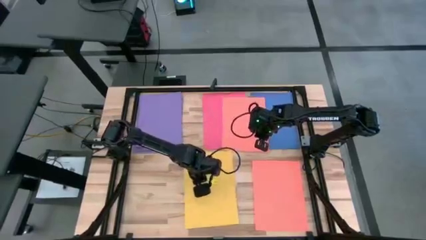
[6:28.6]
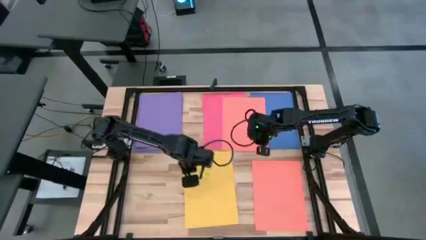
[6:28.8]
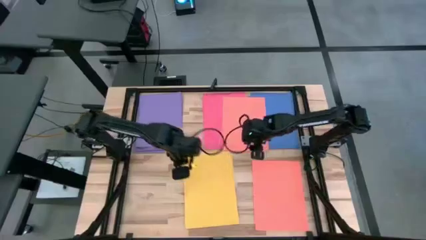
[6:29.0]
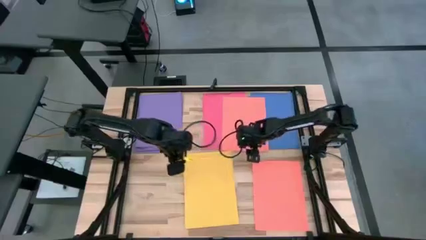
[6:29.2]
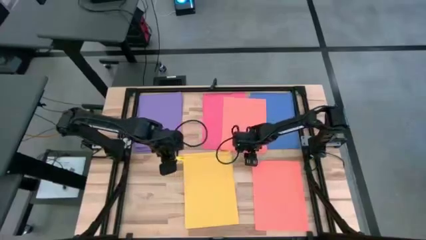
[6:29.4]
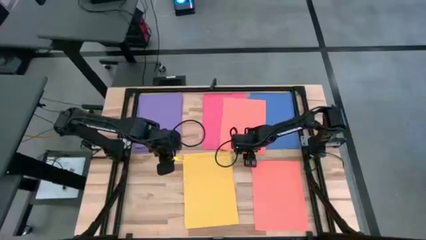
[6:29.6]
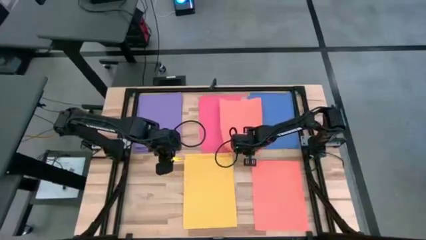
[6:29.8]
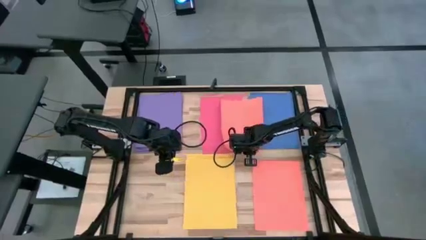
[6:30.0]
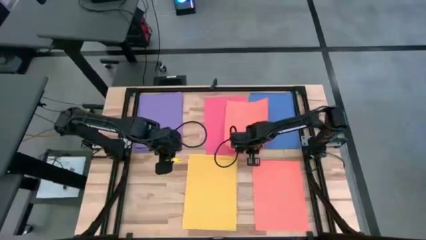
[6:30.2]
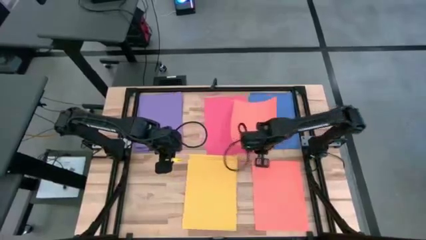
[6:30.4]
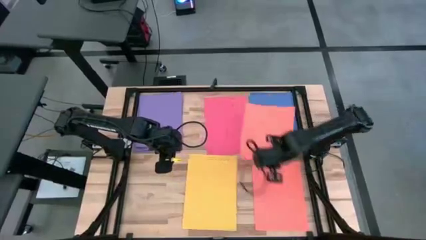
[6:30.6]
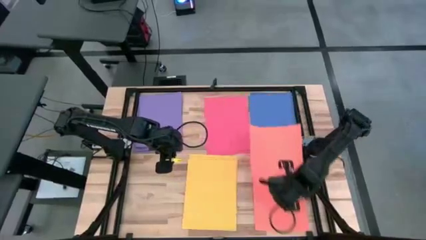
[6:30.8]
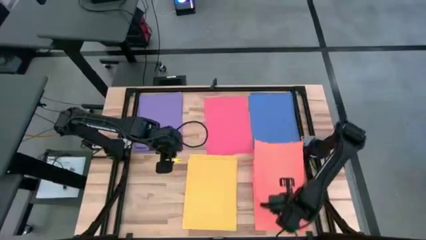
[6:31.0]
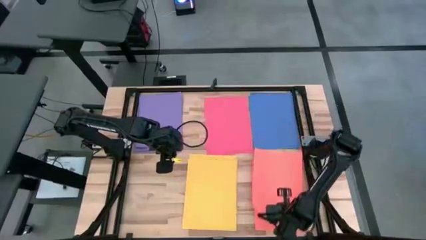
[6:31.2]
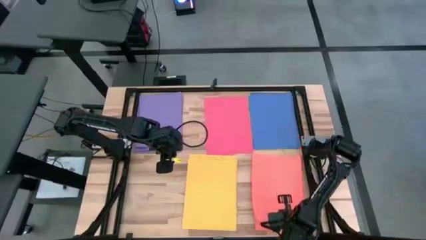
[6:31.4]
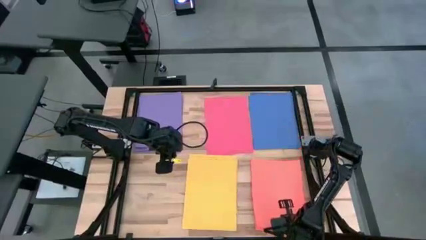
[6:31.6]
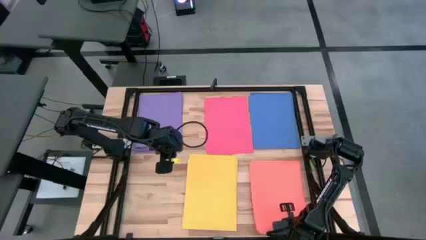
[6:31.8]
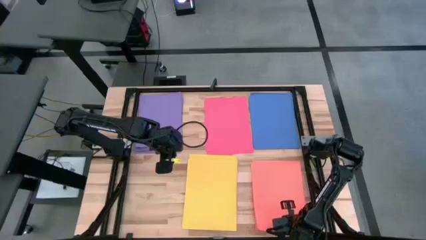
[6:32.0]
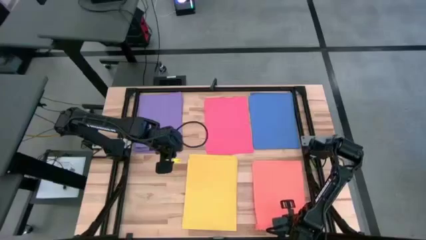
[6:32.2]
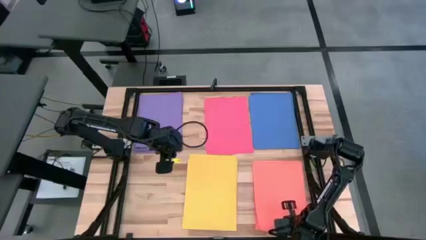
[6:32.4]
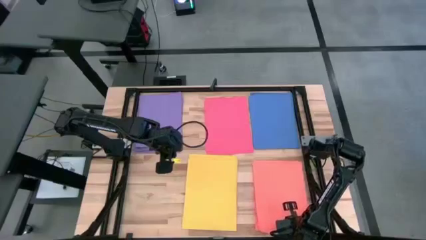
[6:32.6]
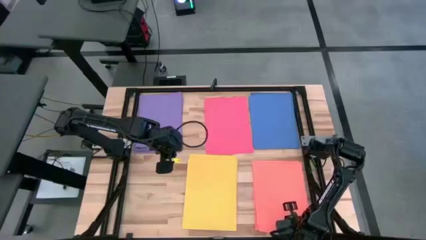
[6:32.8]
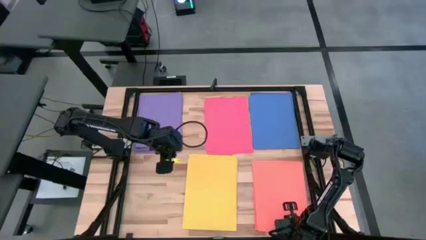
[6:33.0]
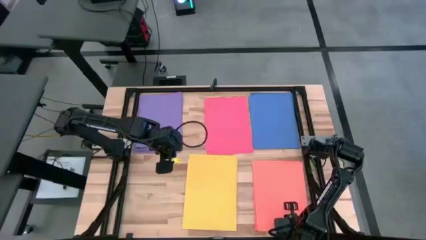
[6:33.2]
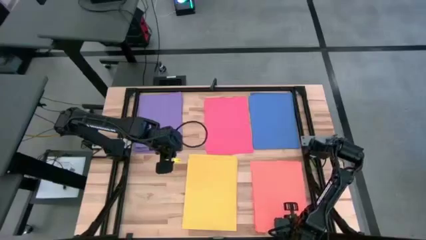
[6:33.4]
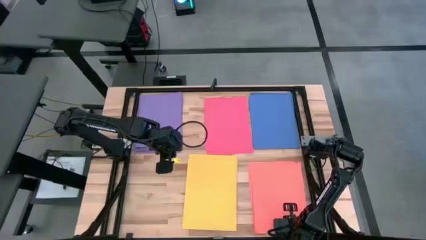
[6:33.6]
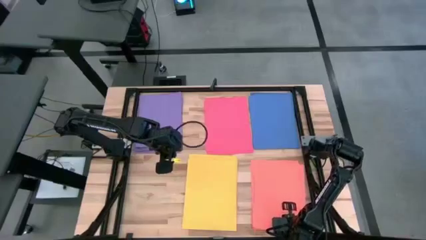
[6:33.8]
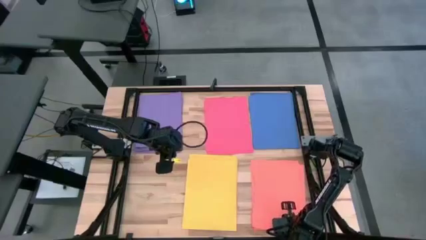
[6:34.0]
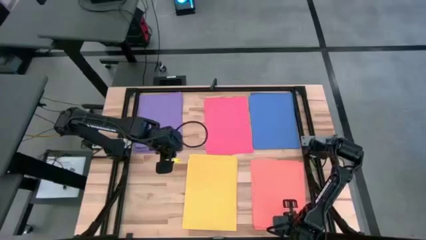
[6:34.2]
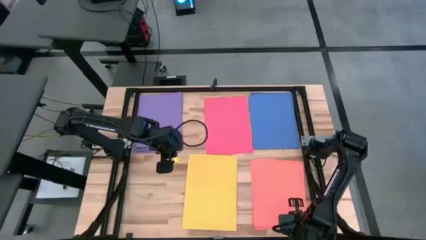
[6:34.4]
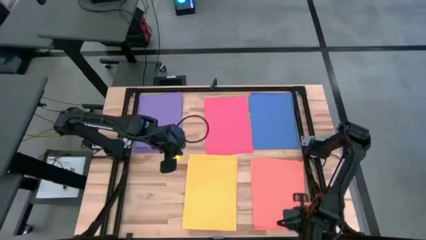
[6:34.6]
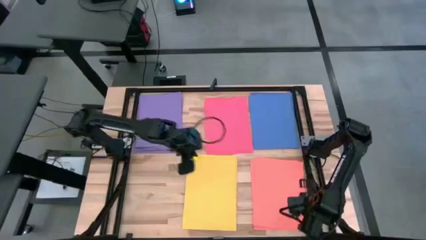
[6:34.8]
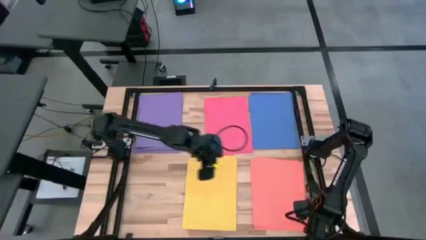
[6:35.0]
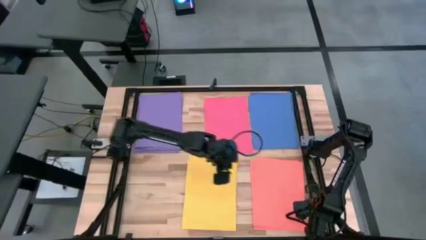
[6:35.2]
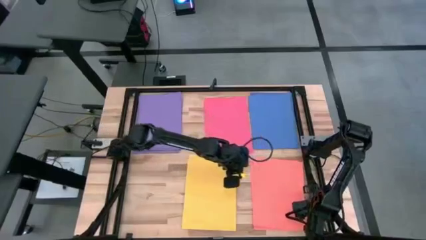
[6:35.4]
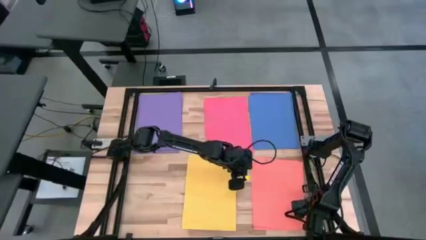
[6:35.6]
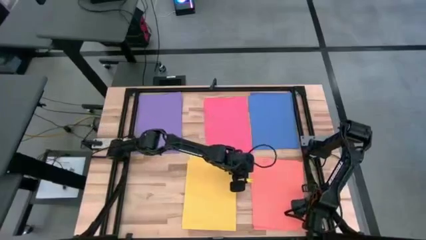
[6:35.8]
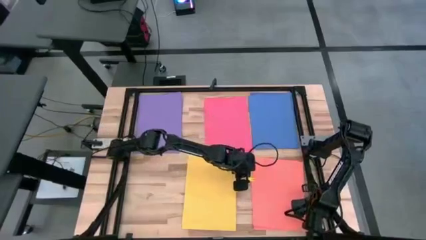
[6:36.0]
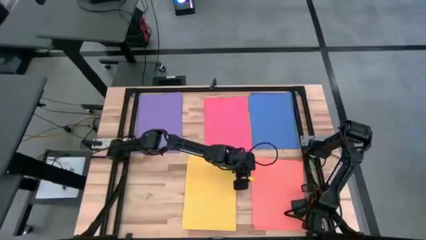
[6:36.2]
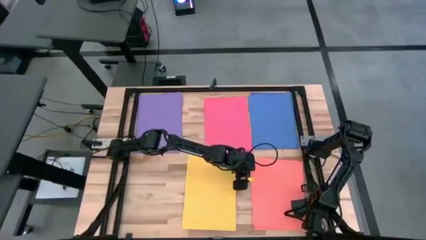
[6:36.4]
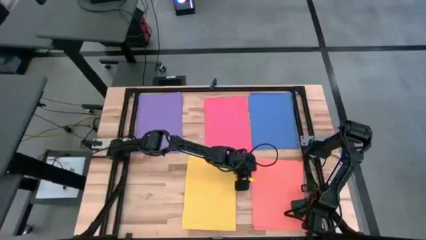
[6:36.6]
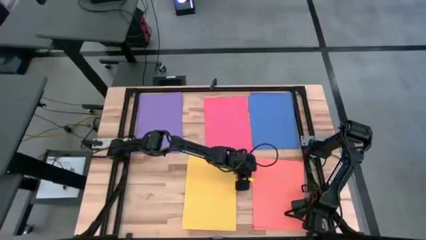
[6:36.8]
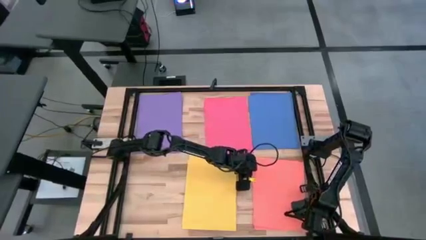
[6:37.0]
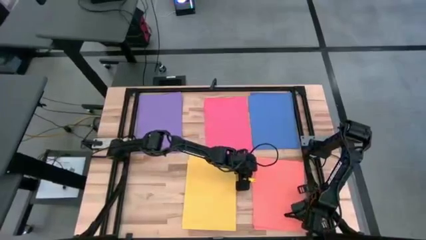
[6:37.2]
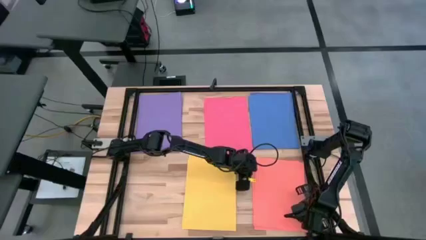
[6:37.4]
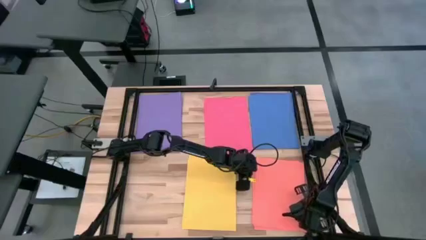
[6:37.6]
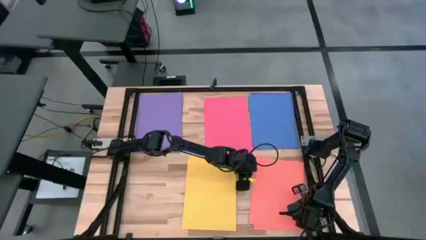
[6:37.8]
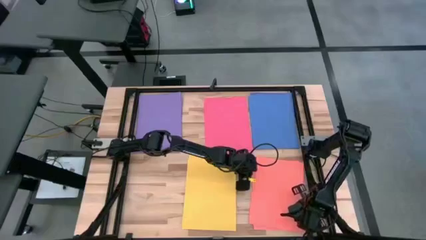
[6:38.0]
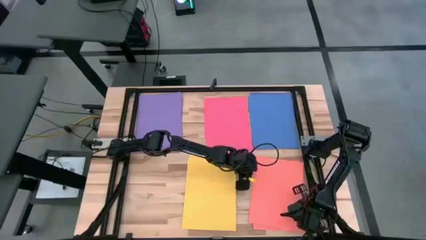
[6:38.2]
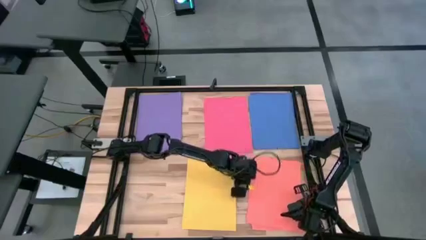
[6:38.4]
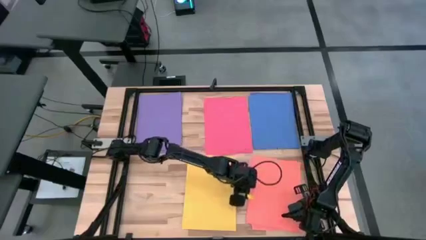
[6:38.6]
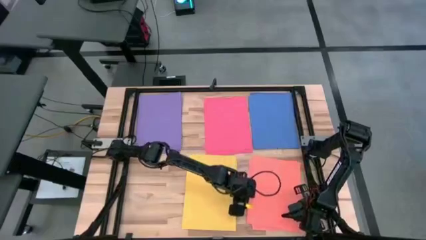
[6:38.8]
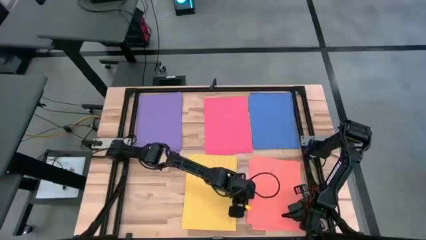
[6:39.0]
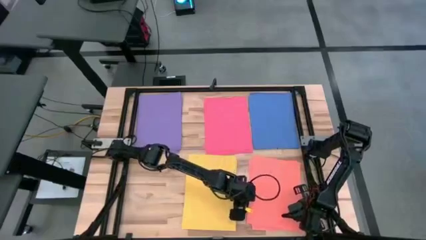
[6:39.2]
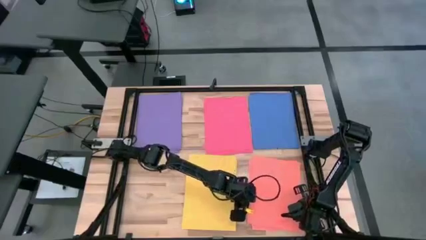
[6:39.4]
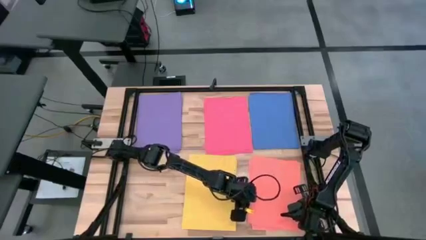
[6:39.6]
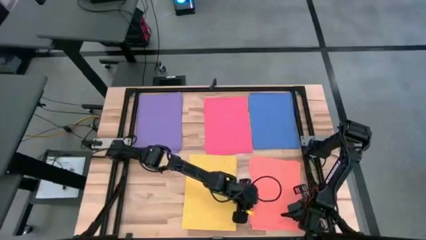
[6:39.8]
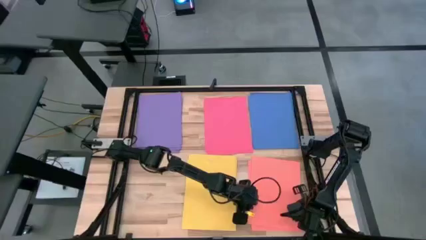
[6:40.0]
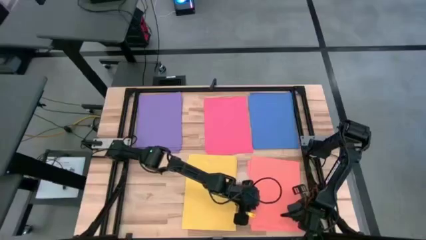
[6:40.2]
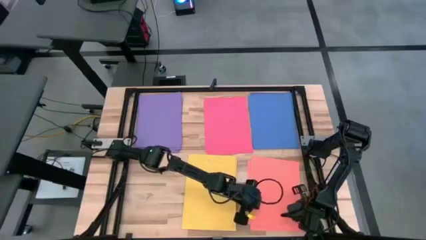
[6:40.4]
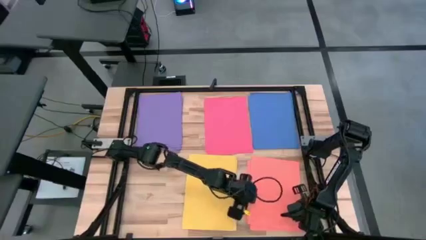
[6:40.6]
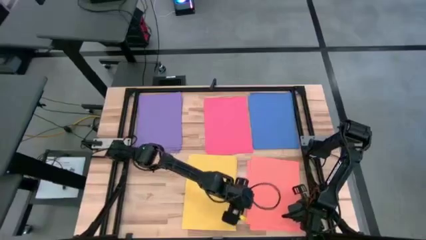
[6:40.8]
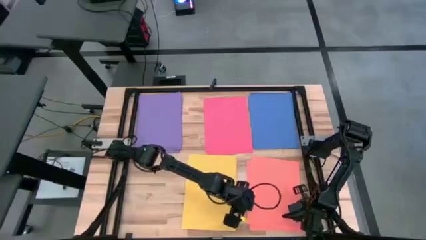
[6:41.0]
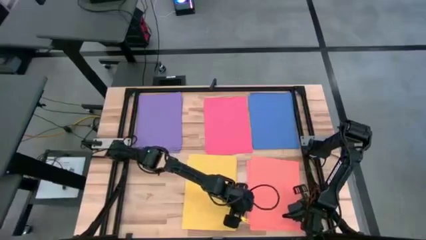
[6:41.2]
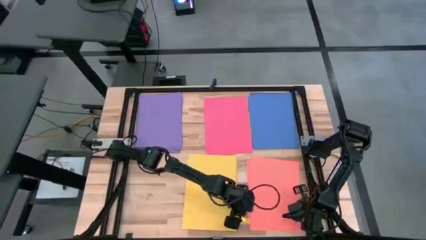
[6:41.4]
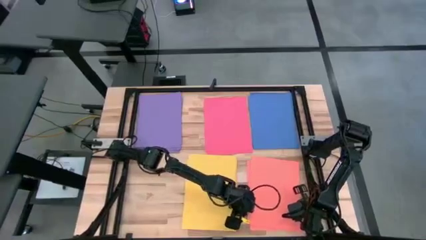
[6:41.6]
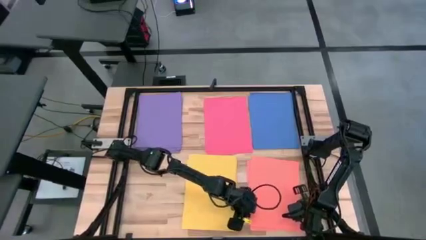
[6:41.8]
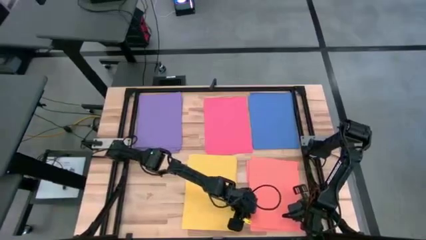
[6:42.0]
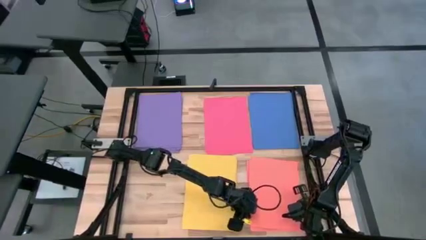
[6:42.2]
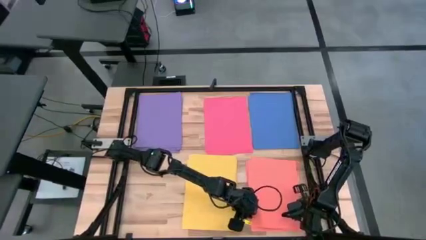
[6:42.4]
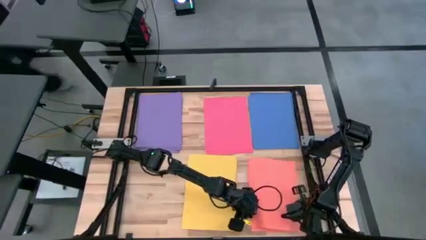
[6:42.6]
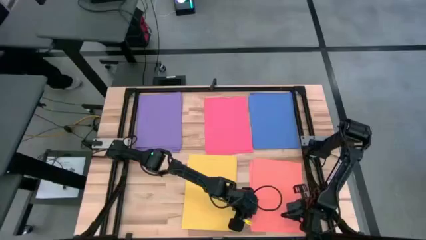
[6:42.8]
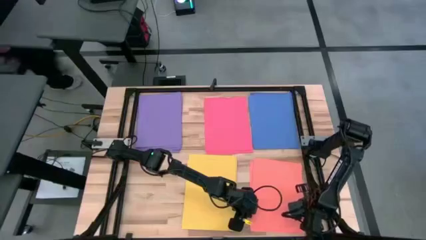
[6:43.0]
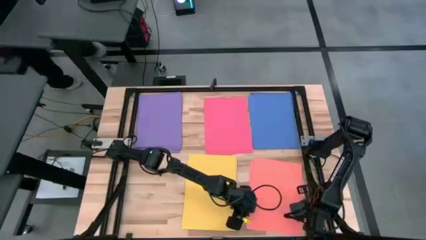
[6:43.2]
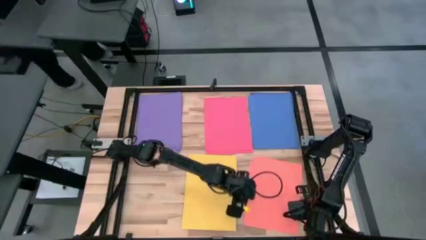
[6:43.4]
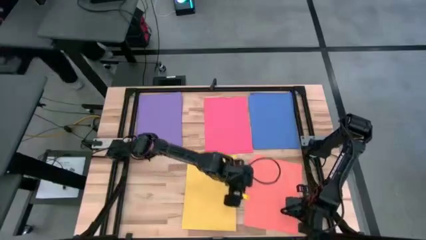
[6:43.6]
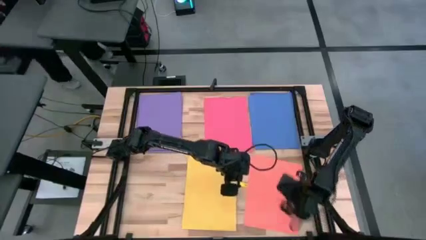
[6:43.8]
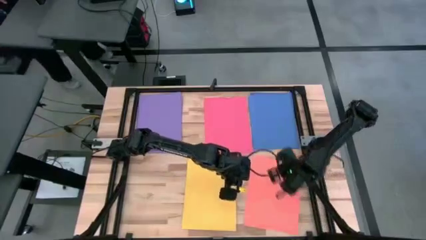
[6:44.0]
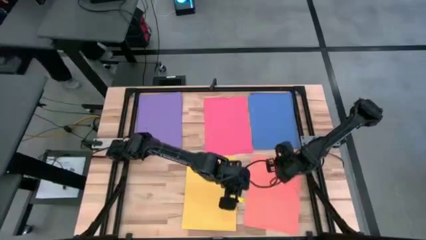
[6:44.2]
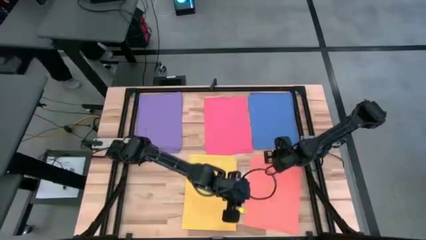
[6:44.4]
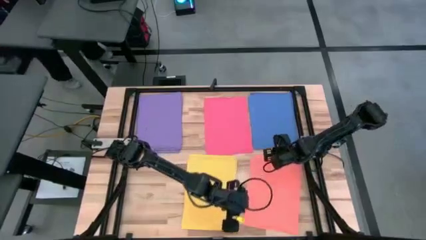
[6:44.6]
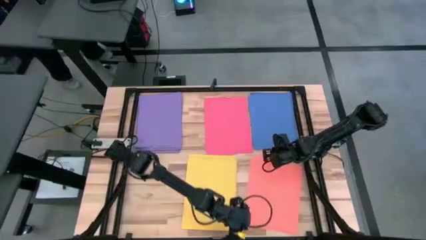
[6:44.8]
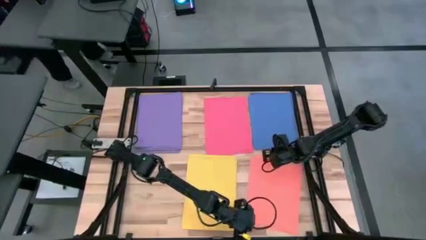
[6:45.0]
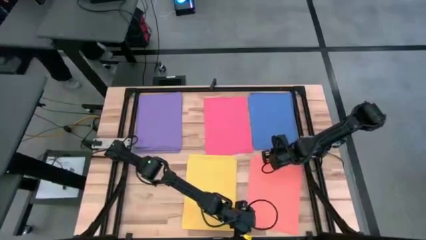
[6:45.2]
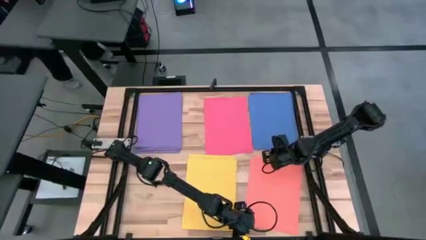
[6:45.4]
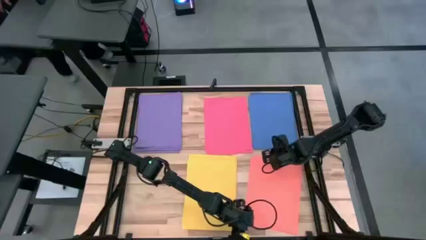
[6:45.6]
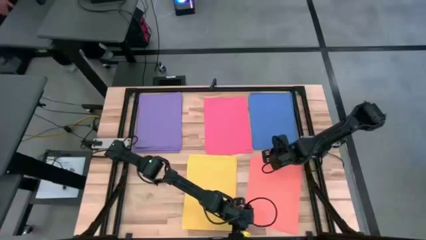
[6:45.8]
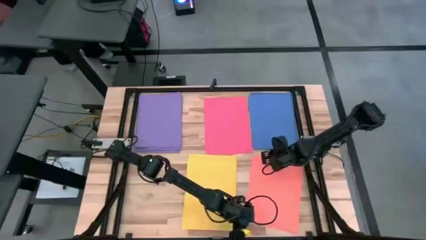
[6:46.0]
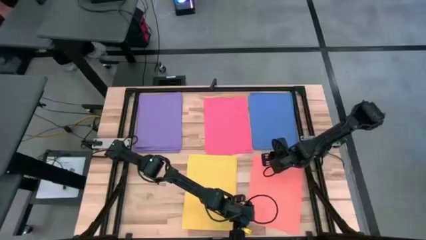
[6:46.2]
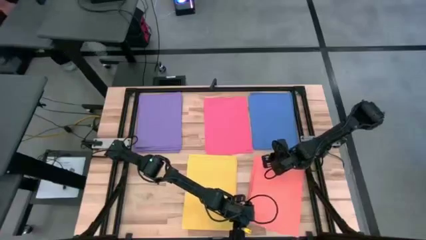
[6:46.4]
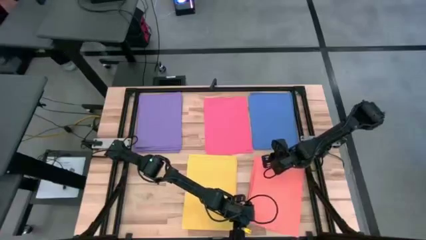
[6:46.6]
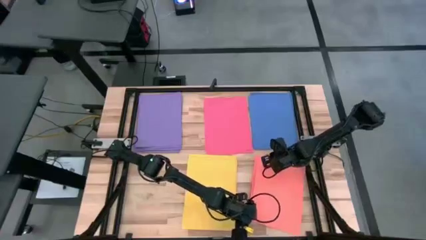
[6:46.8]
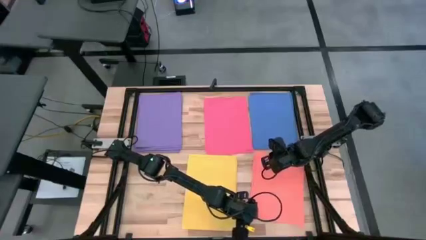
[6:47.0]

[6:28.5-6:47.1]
Task: Organize paper
Stack the orange paper on top of the orange paper
